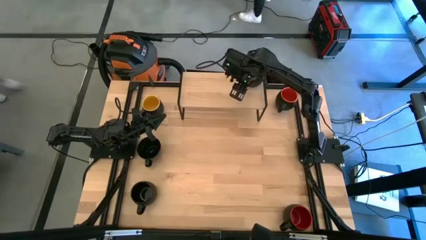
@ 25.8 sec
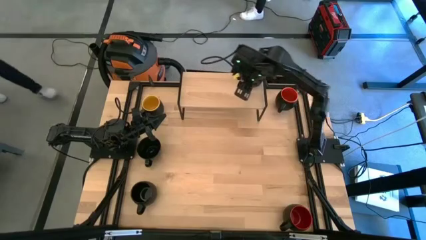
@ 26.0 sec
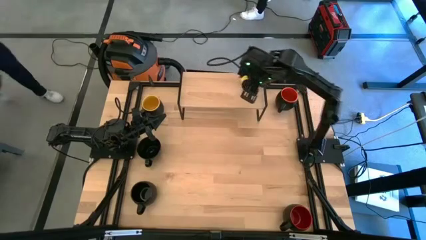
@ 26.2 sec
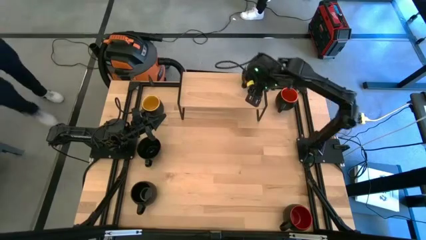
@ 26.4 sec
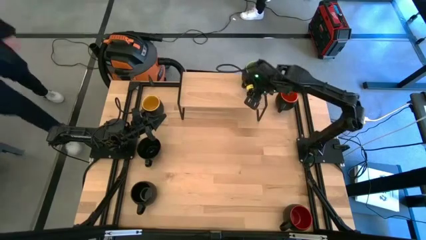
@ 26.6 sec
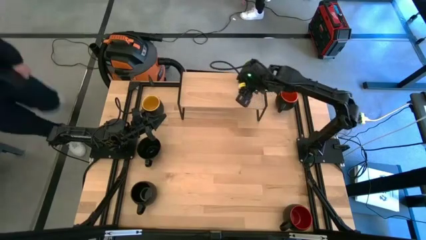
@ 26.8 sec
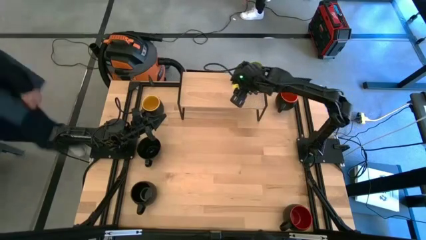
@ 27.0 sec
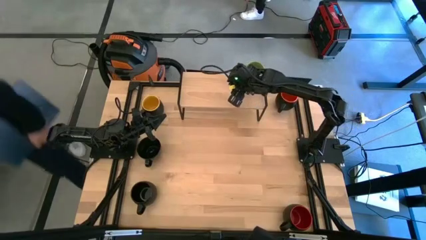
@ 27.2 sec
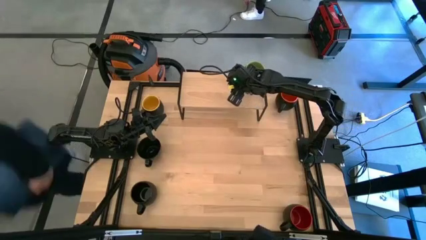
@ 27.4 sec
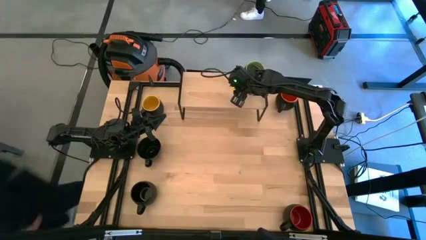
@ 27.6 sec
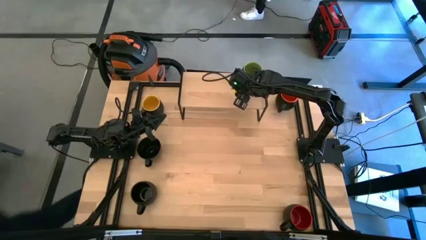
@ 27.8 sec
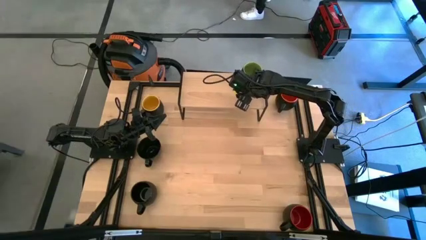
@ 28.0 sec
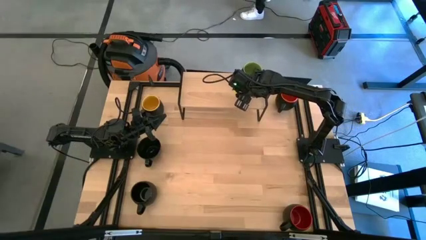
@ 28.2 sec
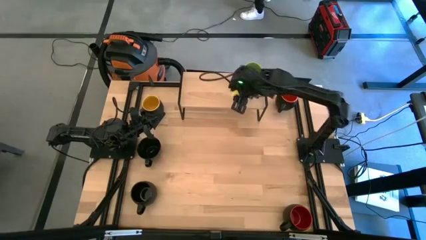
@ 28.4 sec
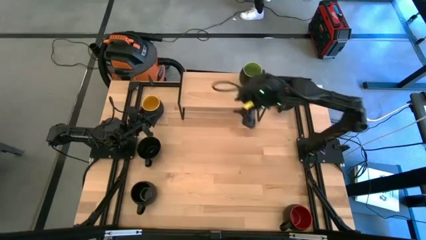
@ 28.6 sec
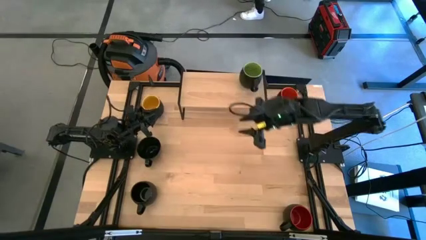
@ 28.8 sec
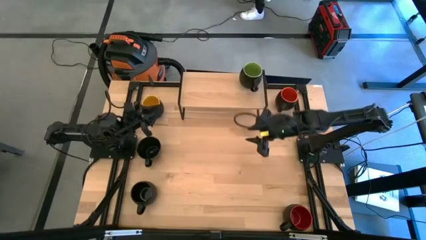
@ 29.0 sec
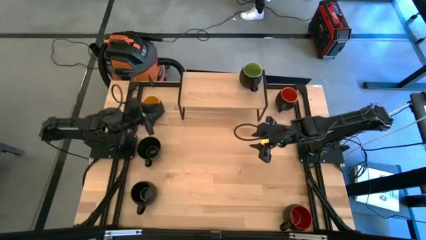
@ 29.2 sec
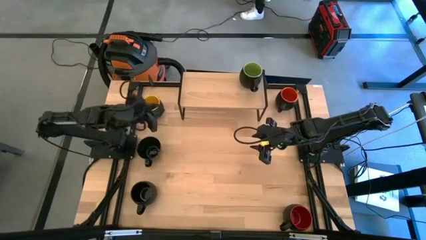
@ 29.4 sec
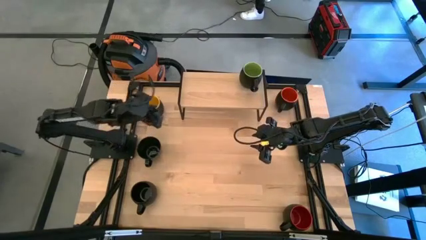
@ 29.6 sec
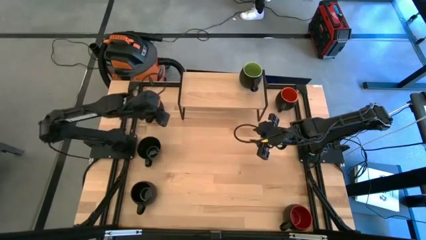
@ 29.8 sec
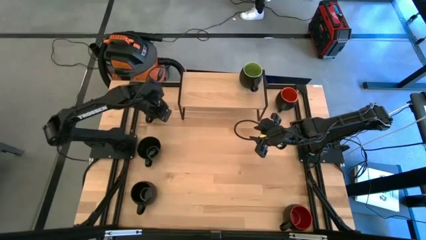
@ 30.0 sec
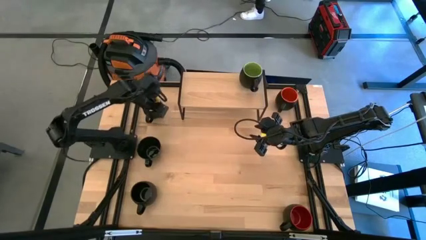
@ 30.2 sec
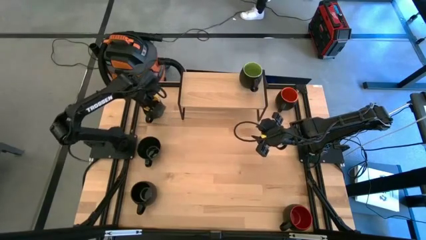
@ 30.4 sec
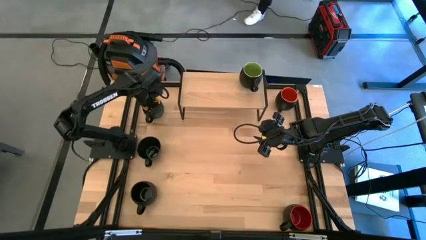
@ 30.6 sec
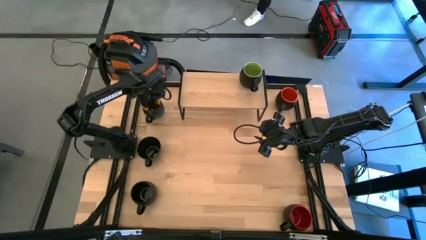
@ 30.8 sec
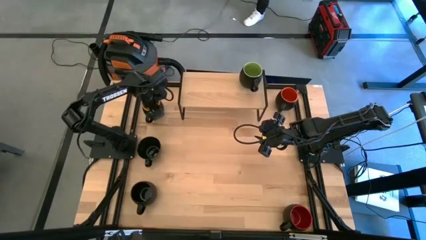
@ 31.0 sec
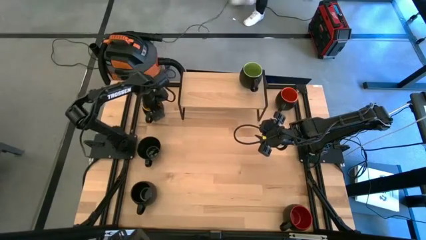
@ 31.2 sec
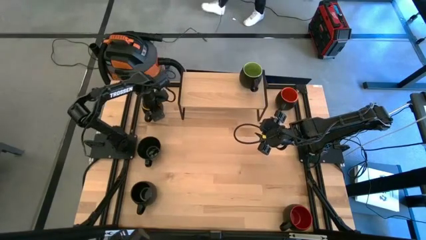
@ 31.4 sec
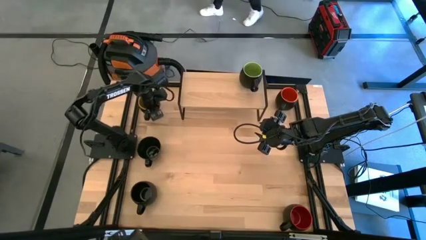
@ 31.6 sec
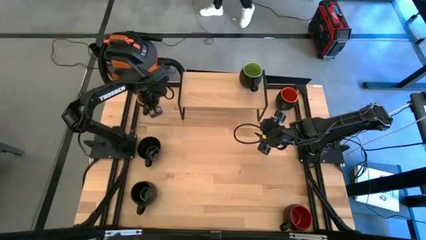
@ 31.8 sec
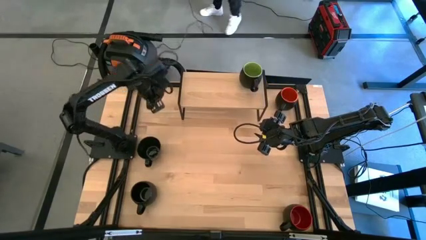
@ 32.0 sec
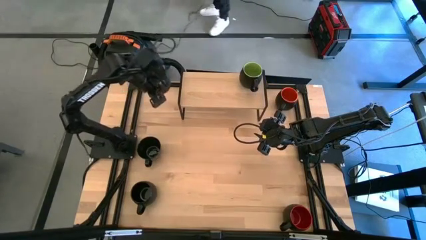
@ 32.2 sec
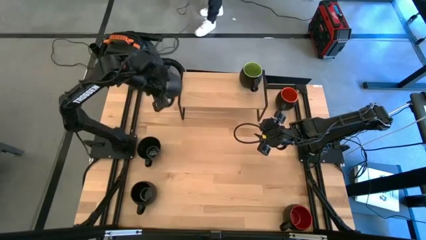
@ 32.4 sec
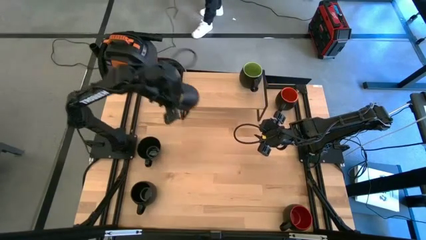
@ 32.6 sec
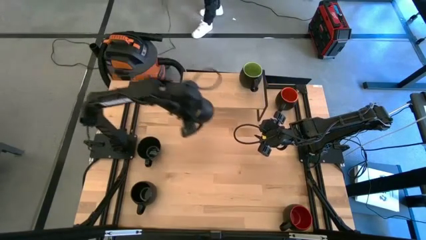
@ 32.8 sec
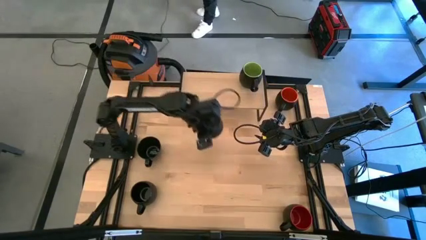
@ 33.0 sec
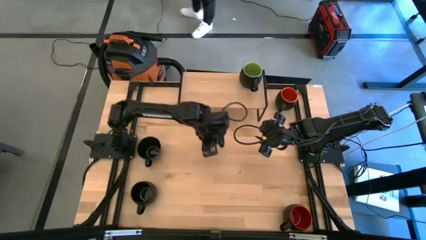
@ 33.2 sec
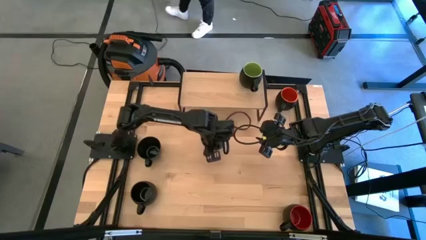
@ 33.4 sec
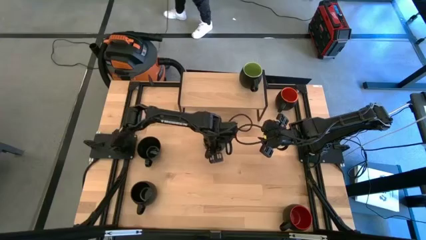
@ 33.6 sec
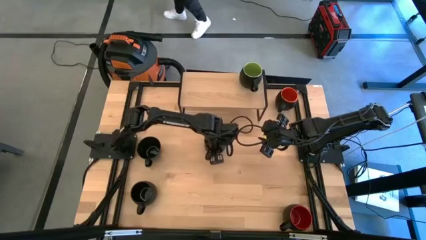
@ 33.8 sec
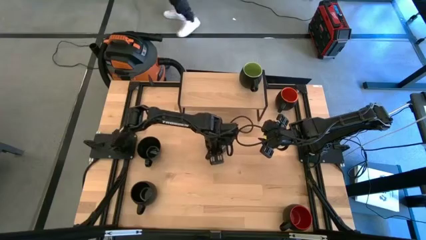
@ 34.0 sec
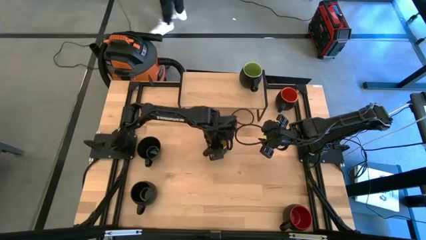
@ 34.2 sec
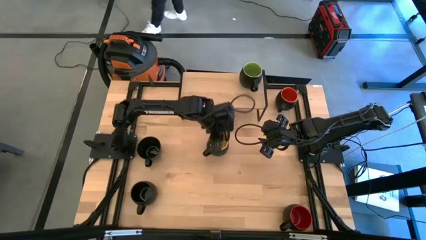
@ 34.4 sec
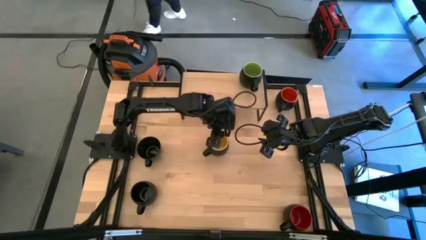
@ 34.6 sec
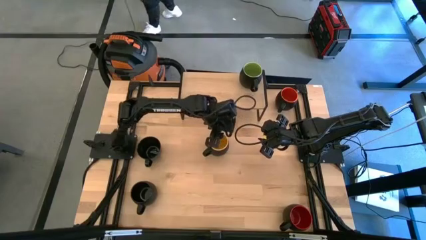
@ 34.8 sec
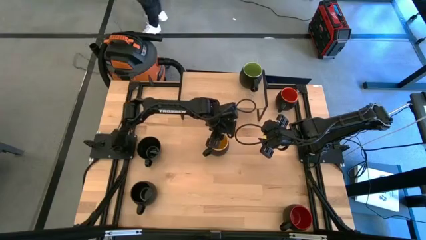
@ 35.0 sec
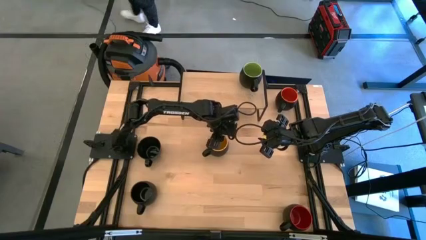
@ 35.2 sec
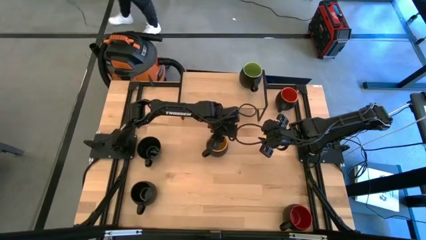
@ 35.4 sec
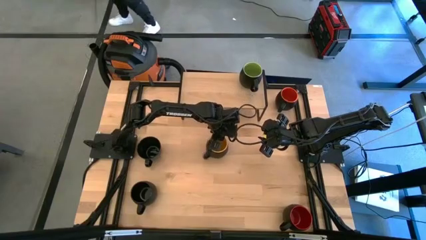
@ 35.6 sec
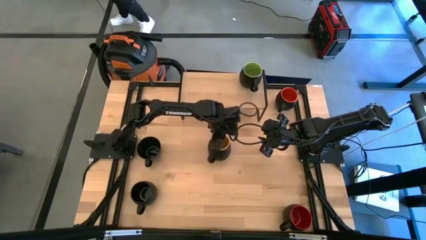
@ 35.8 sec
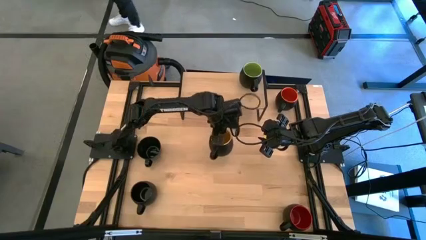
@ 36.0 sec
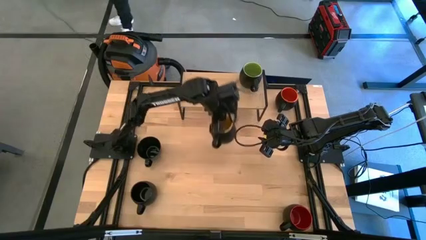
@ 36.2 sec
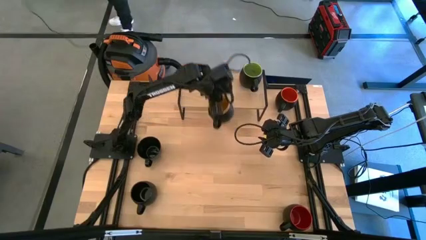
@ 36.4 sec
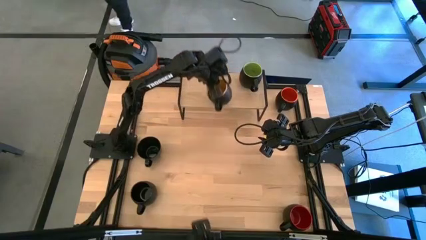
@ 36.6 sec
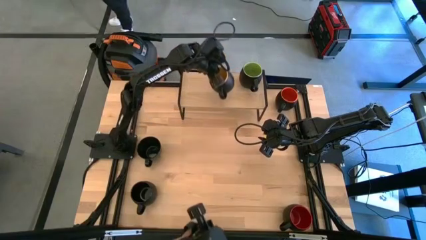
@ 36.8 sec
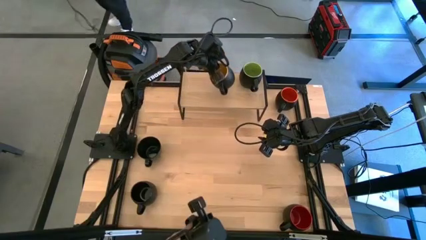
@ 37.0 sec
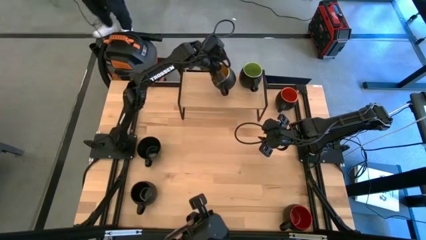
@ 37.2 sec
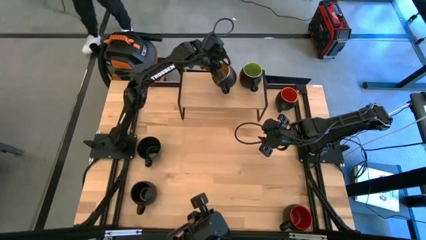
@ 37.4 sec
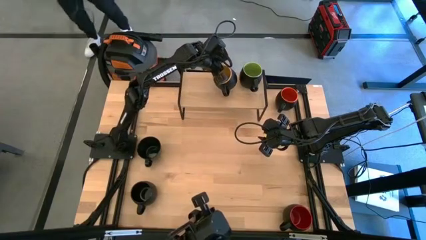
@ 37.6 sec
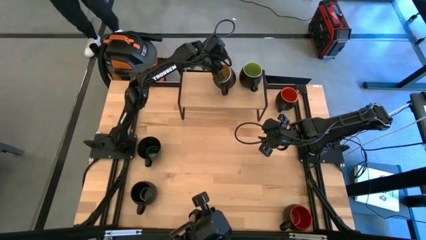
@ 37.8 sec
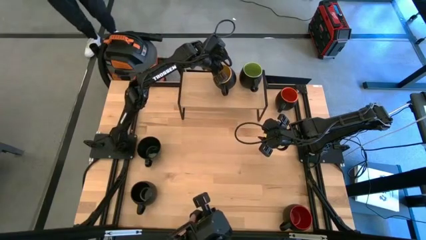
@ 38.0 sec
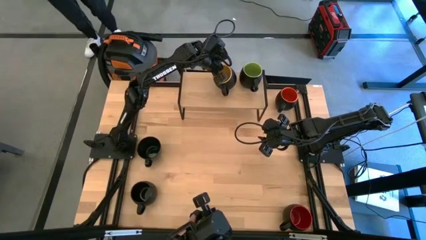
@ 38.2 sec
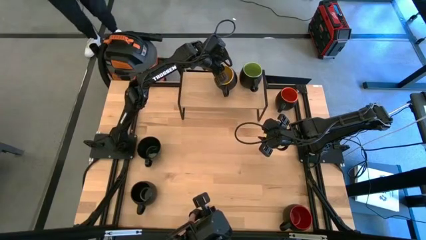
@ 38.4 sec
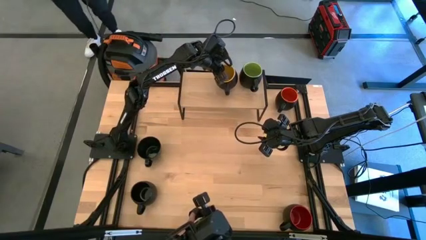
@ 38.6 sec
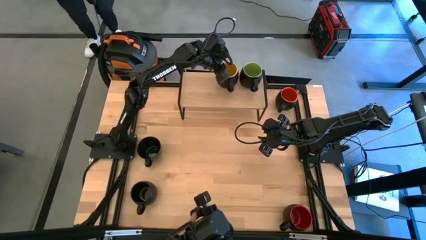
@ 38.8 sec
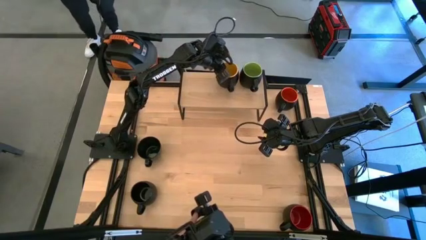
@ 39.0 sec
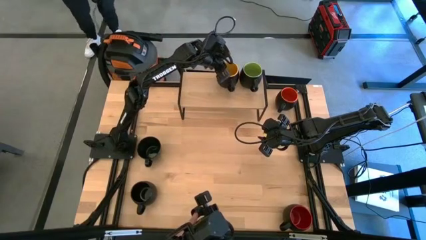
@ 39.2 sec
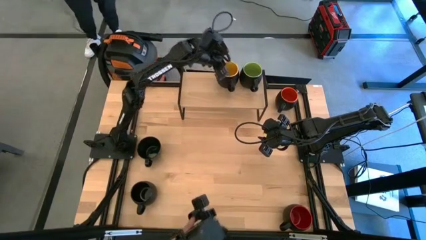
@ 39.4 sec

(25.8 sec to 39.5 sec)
Task: Place coffee mugs
Put the yellow mug on the shelf

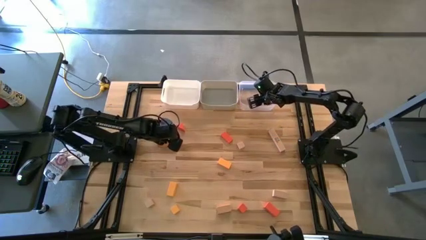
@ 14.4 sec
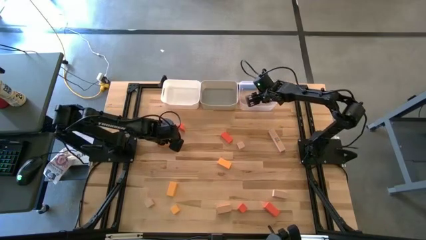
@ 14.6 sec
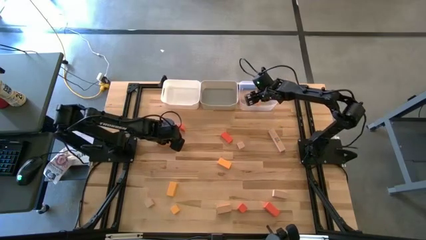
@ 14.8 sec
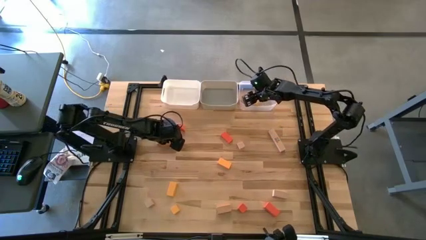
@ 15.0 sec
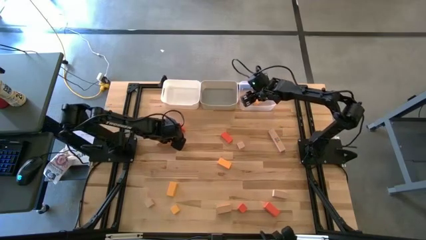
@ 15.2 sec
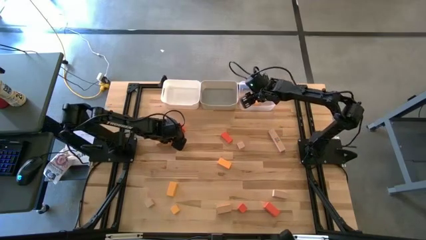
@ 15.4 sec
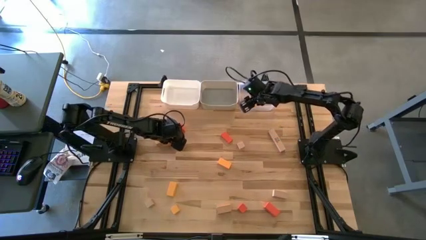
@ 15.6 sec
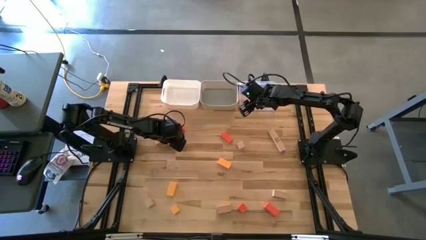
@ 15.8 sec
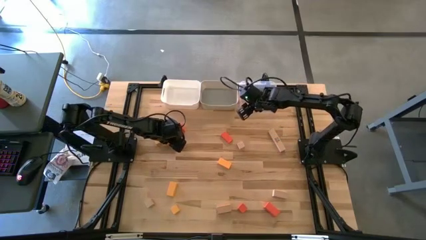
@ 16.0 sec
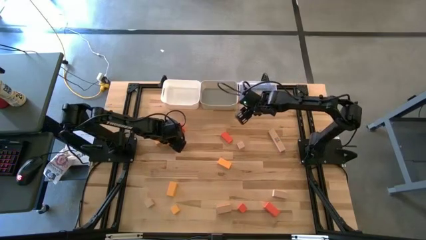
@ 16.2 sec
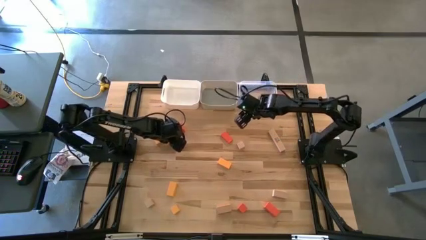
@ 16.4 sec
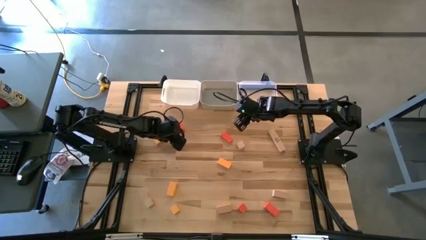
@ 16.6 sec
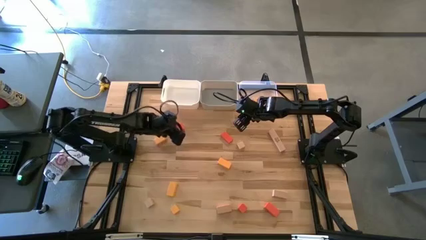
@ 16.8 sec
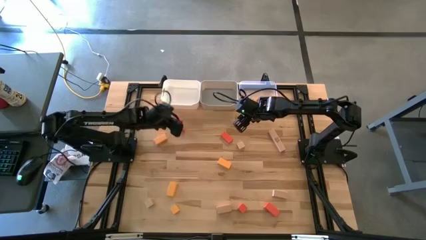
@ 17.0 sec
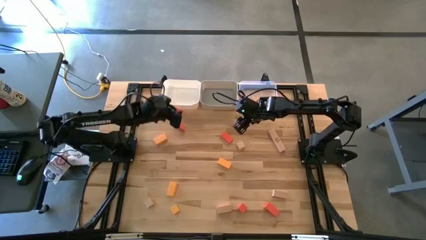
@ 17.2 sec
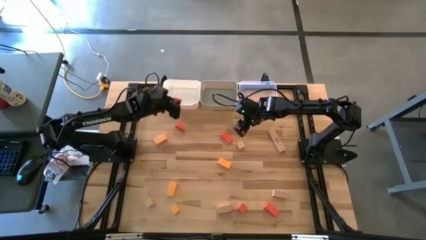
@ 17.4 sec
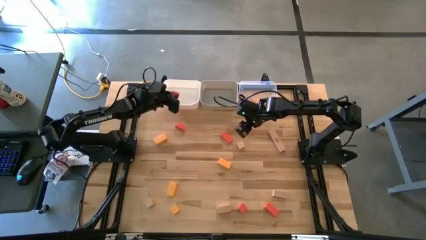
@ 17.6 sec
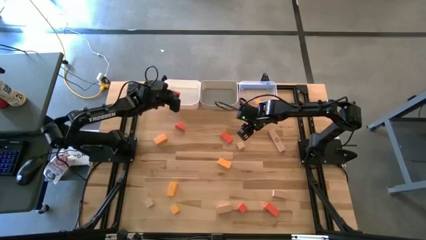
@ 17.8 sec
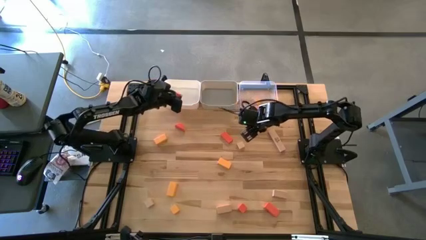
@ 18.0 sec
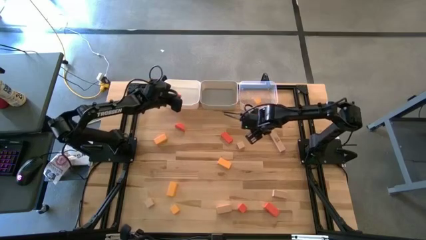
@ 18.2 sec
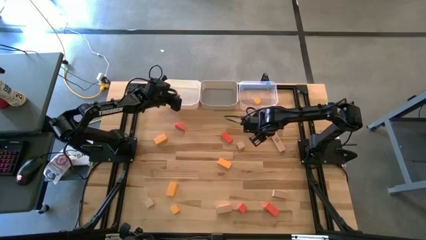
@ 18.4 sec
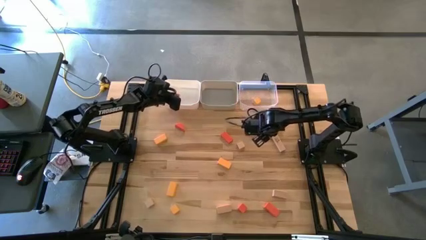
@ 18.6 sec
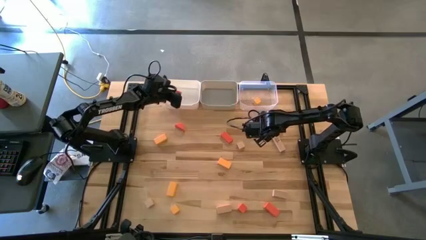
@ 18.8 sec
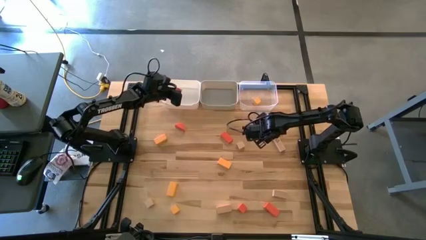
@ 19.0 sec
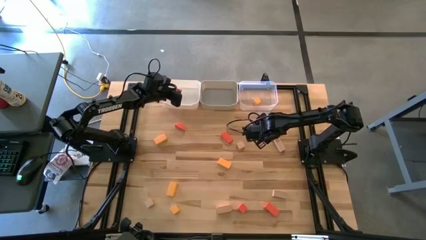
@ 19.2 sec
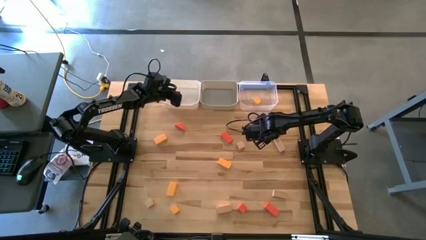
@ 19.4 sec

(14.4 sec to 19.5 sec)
Task: Sort & place blocks by color
Put the orange block into the white bin
